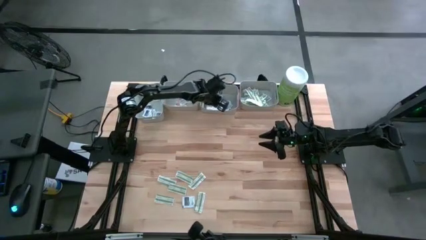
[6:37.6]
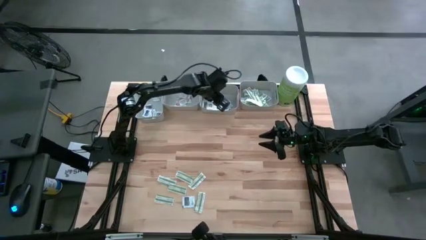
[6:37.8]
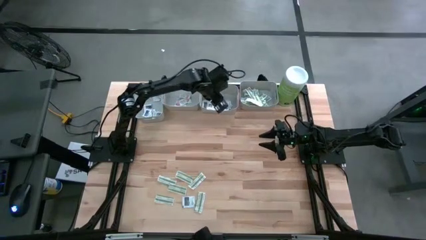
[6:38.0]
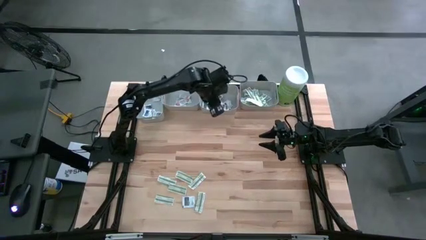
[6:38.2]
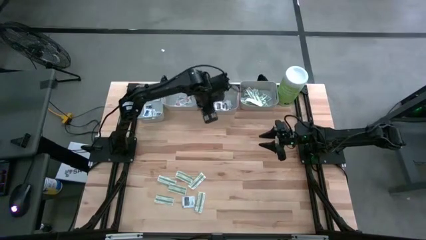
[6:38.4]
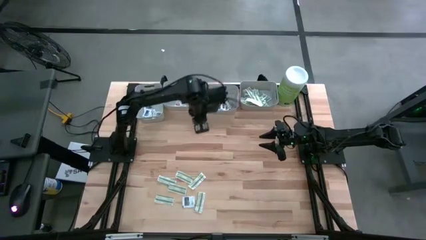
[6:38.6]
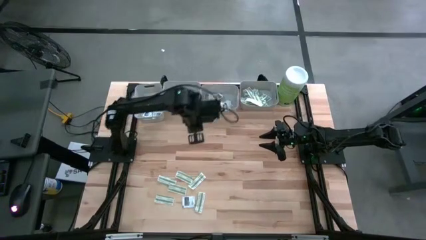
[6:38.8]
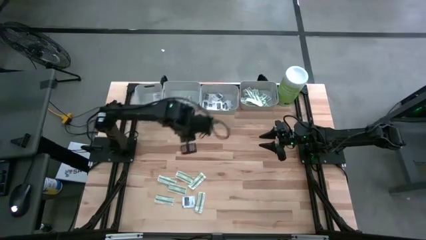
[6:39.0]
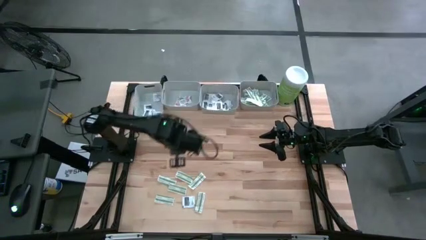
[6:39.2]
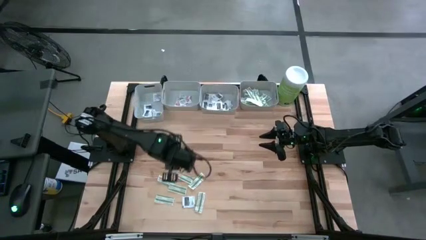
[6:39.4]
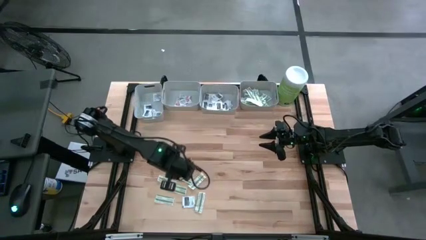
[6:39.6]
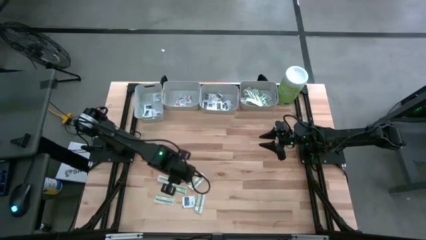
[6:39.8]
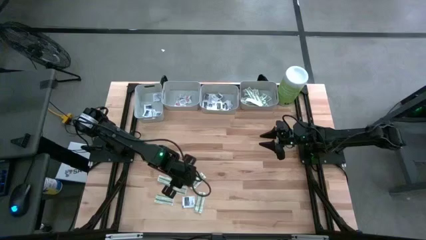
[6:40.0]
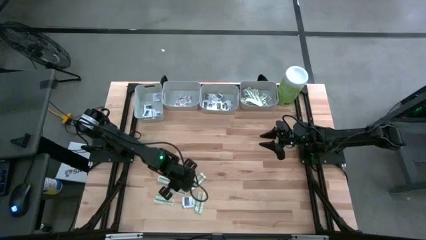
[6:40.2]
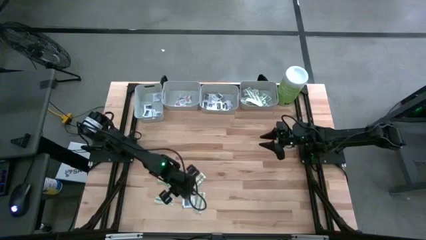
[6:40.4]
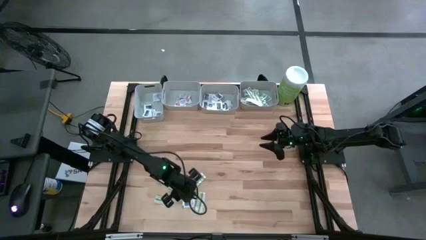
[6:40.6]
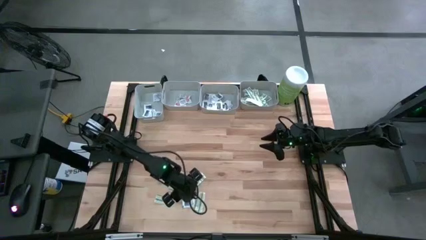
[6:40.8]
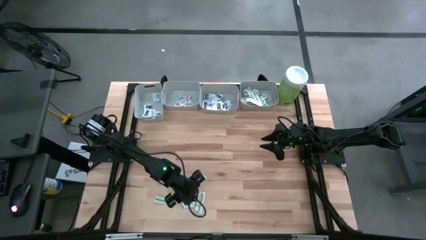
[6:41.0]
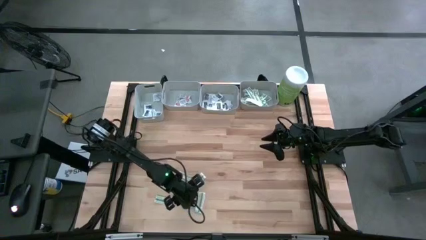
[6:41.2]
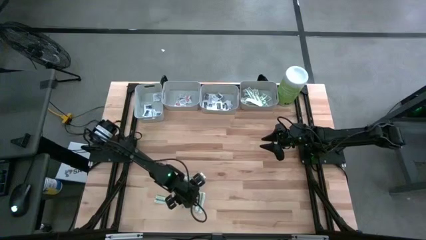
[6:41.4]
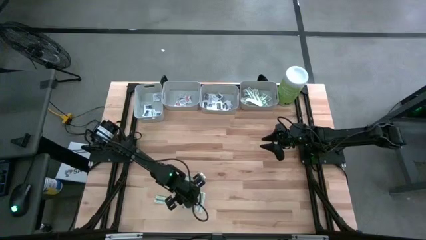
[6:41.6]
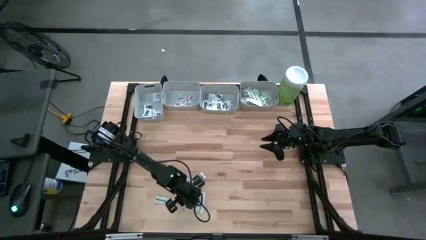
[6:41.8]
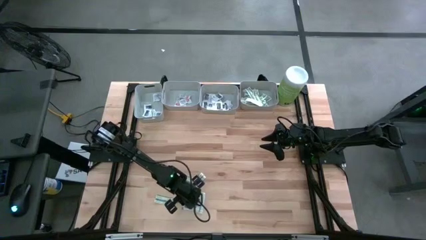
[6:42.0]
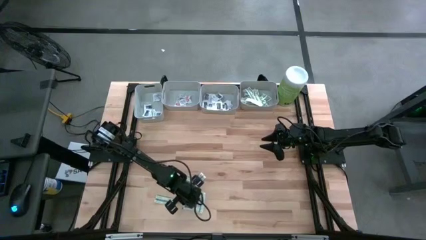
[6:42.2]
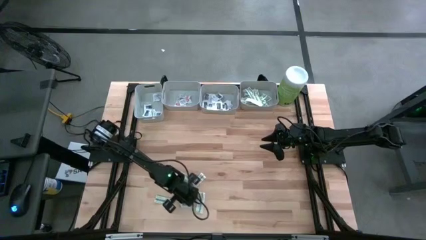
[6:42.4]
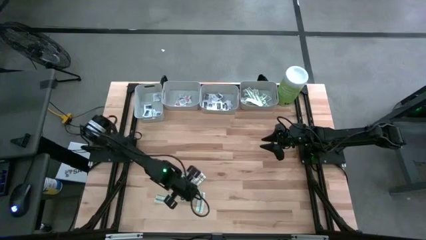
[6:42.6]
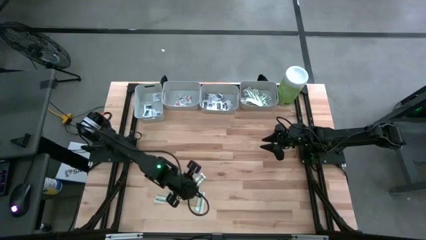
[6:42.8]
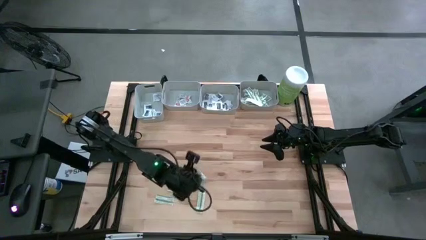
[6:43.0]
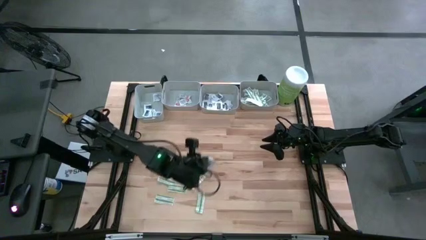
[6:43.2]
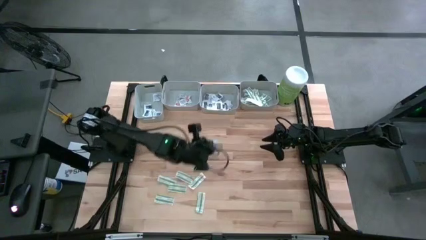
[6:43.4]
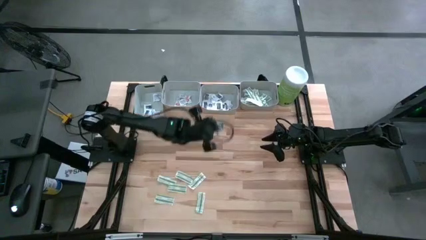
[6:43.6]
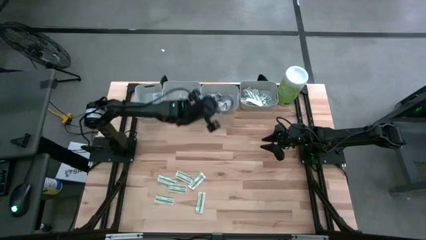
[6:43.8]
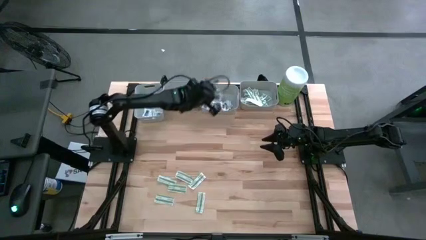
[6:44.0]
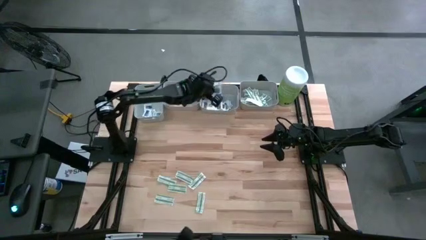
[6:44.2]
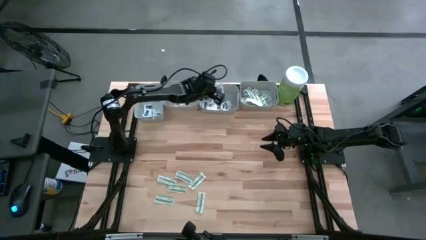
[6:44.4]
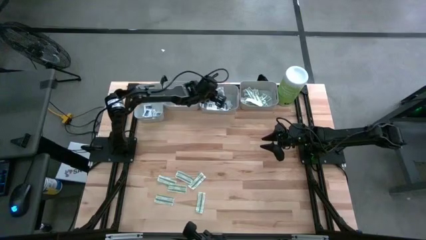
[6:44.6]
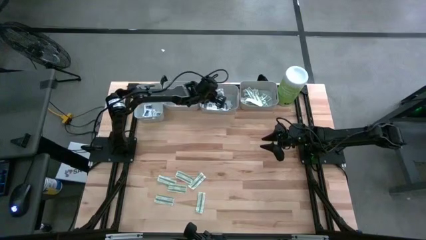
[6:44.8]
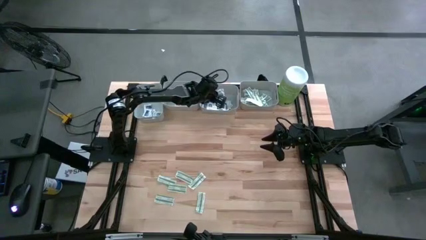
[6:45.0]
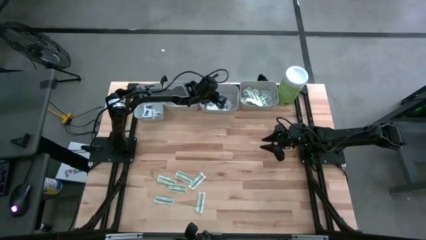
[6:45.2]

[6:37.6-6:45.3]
Task: Pick & Place First Aid Supplies
Put the gray towelette pack into the middle right gray bin

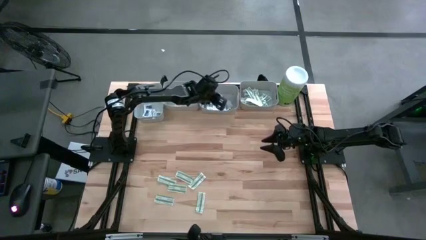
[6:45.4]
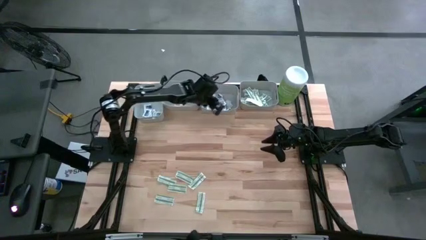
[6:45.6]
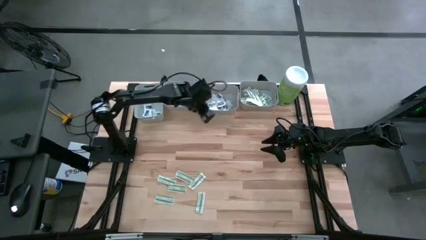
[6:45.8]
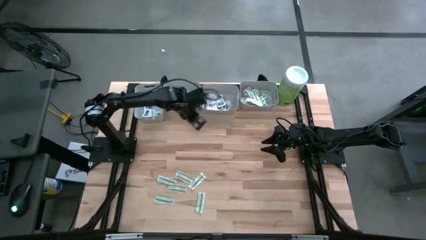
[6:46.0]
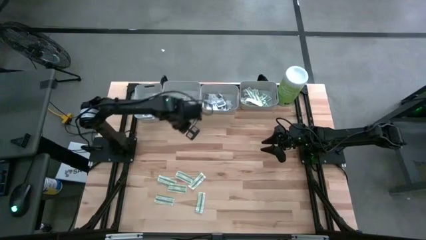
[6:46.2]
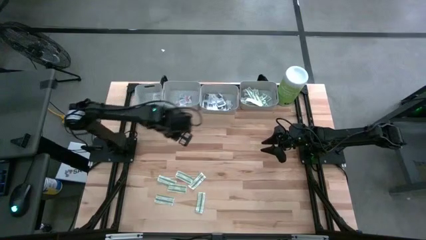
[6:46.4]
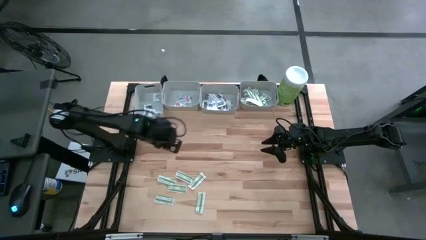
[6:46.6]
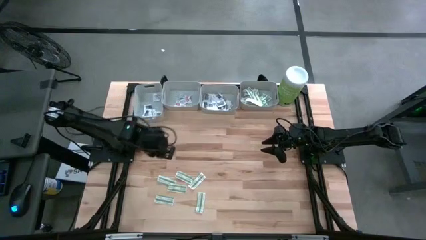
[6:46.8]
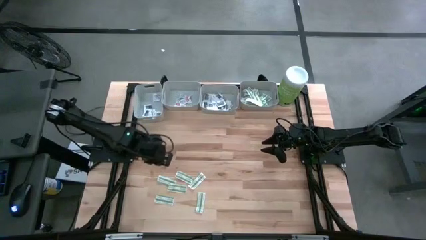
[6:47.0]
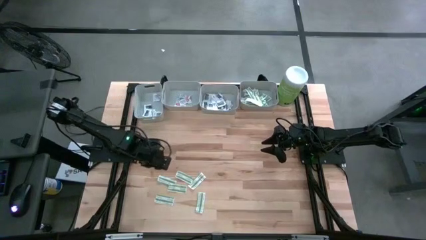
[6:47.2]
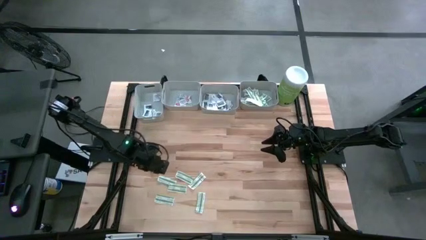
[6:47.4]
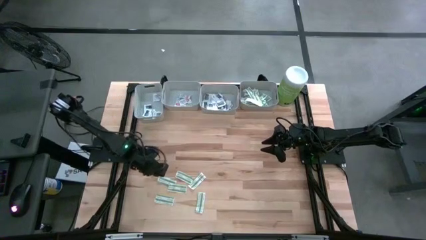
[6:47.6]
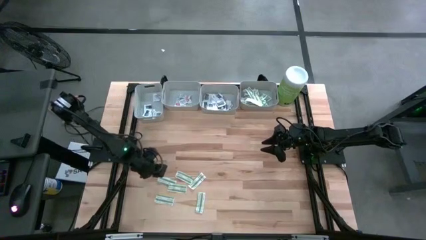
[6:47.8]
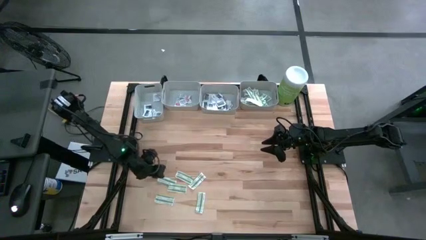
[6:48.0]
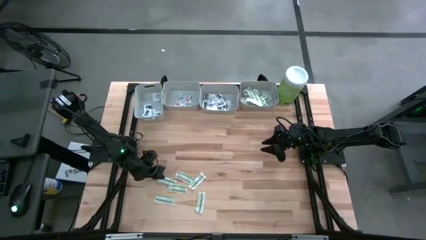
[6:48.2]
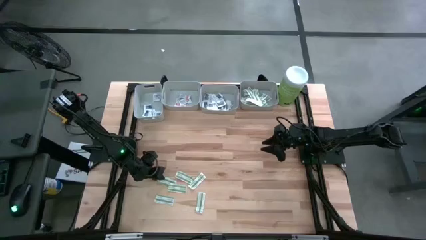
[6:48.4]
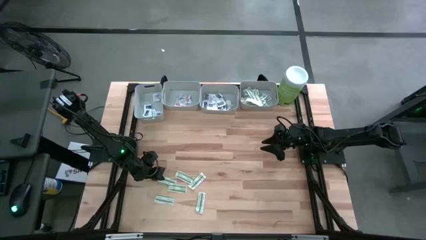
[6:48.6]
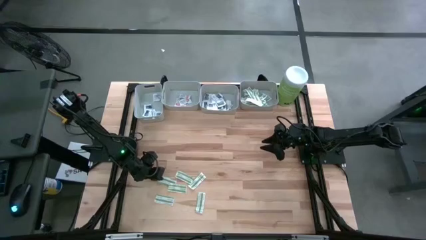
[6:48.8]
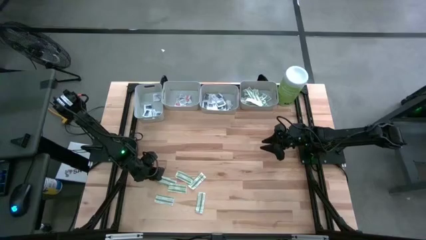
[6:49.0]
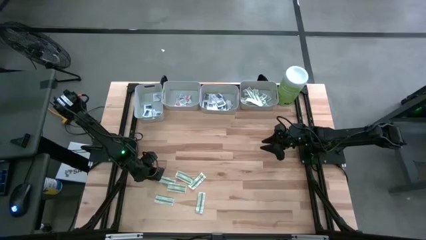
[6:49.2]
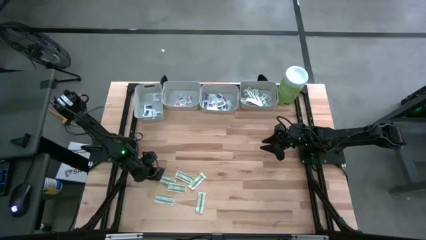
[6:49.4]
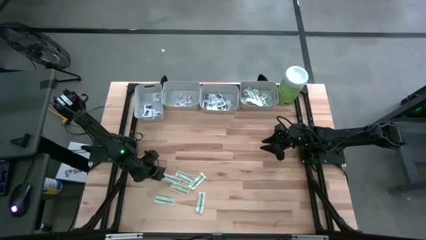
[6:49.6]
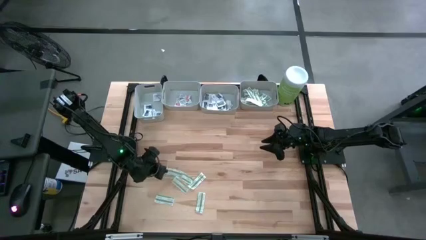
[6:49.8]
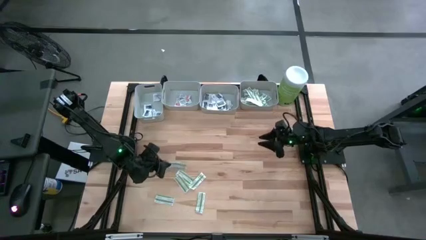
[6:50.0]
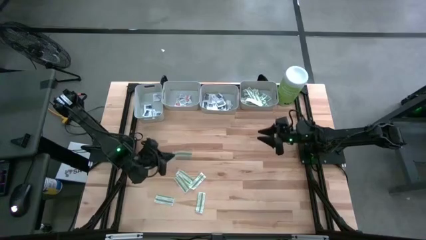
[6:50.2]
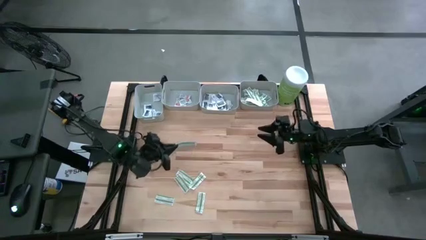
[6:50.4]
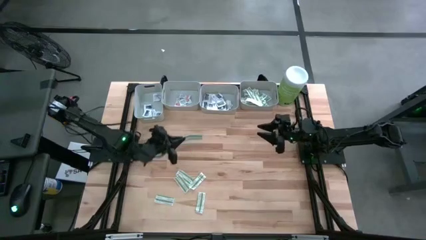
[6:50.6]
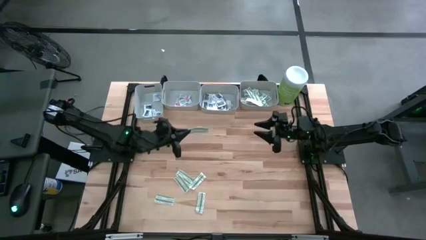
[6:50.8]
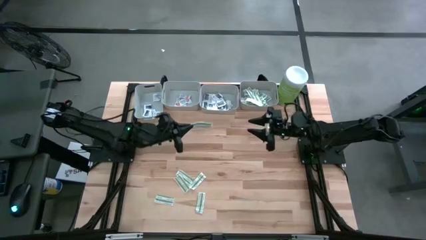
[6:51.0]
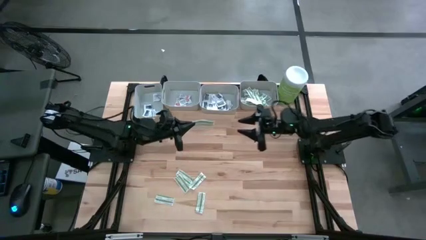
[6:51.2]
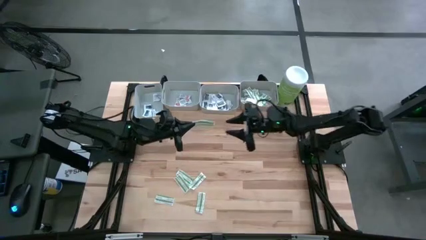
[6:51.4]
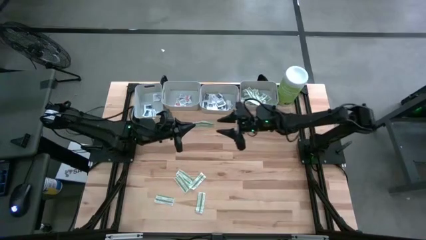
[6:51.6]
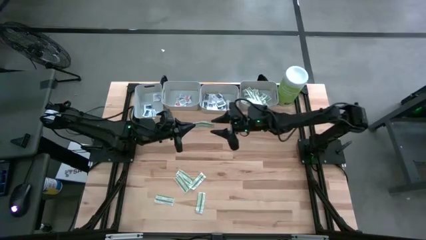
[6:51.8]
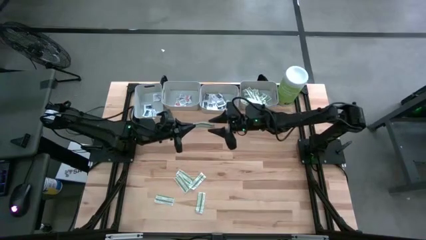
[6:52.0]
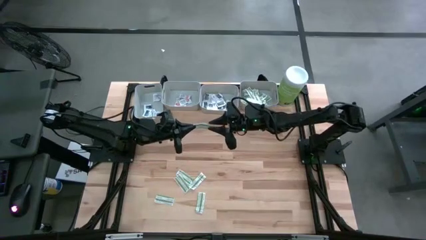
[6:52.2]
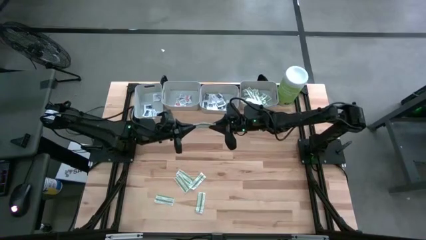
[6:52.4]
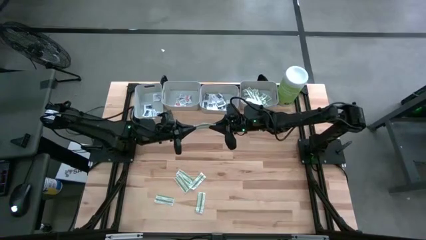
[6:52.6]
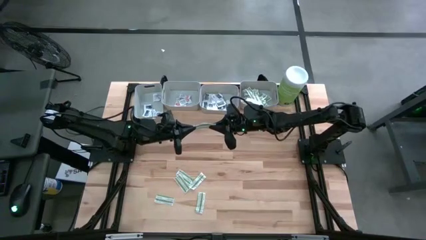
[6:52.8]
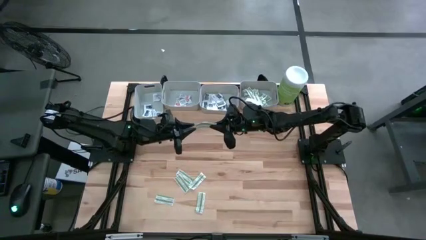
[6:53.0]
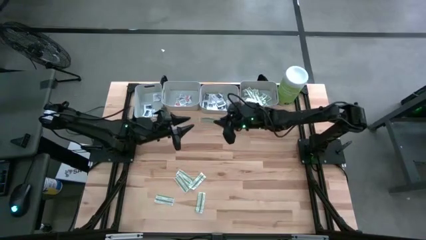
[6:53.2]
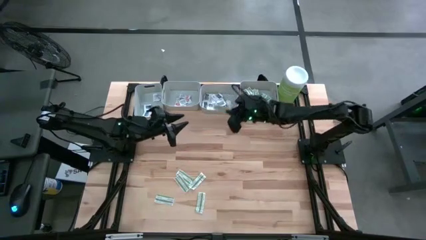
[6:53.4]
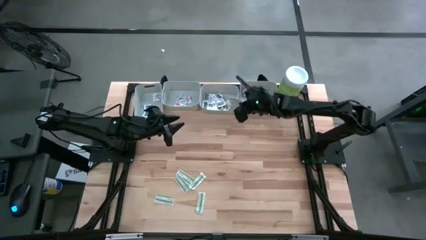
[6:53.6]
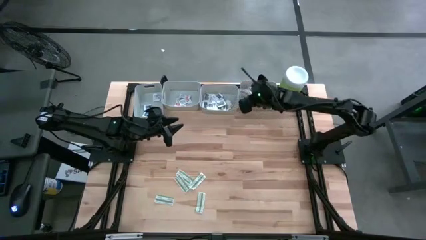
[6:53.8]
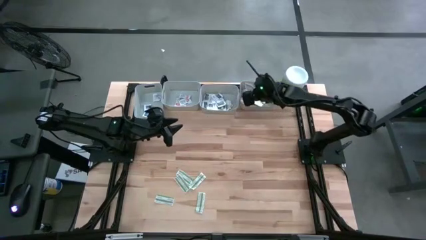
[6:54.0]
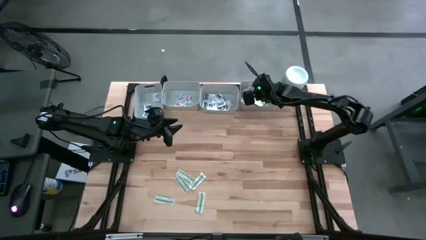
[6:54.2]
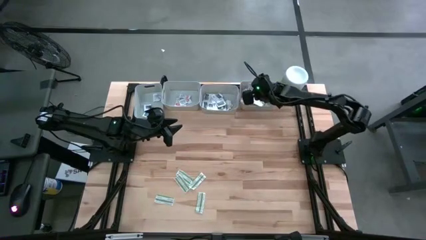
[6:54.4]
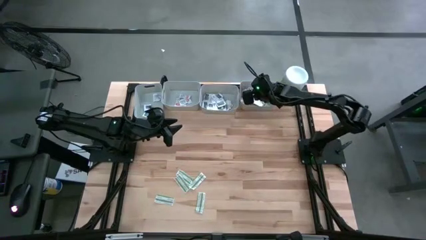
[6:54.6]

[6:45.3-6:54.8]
Put the green bandage into the right gray bin
